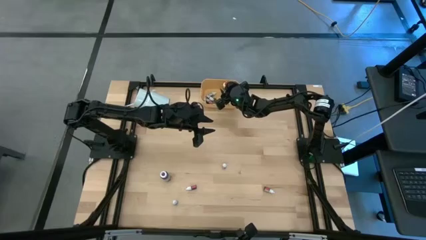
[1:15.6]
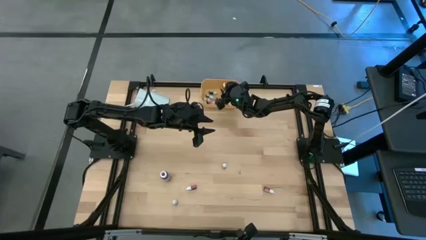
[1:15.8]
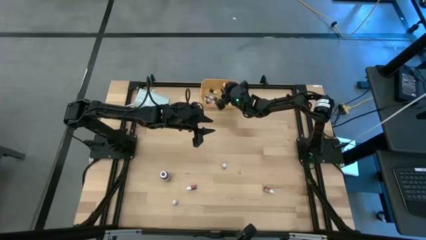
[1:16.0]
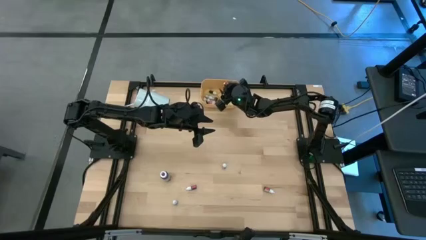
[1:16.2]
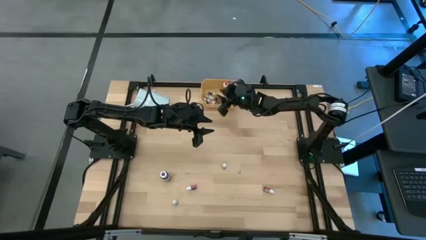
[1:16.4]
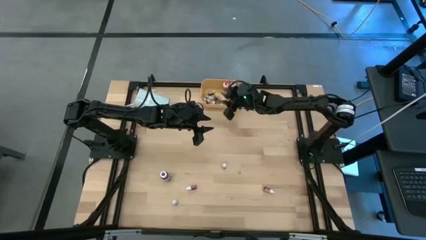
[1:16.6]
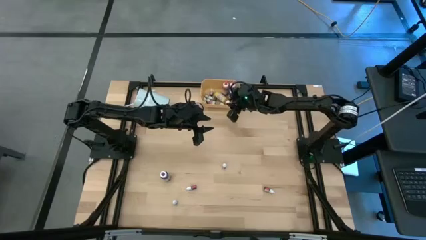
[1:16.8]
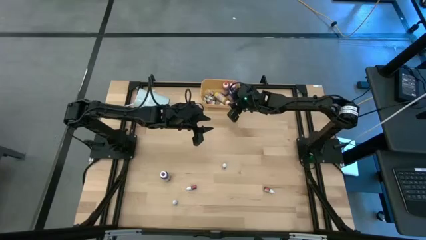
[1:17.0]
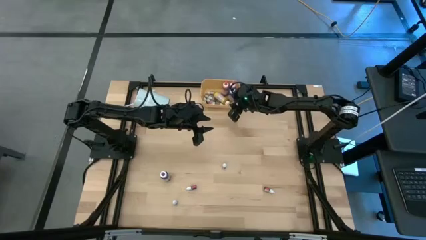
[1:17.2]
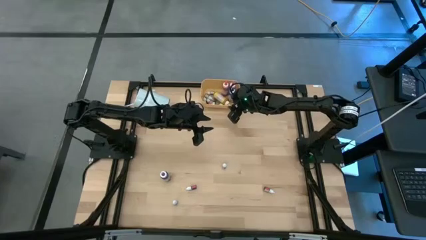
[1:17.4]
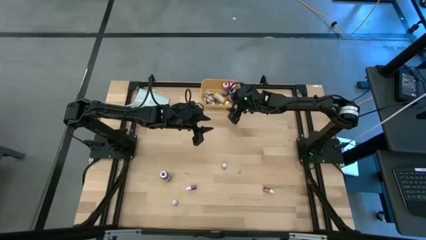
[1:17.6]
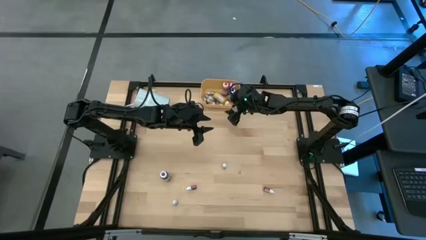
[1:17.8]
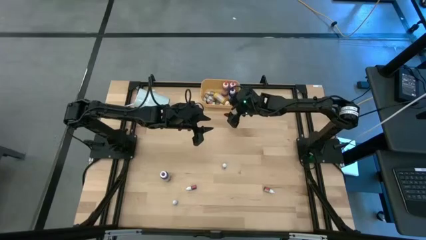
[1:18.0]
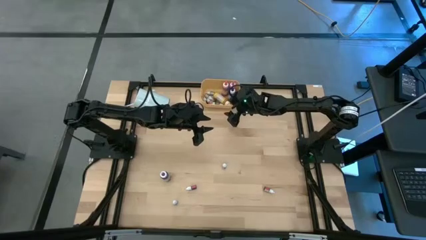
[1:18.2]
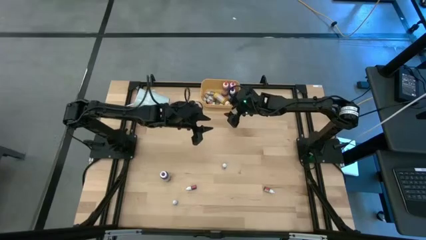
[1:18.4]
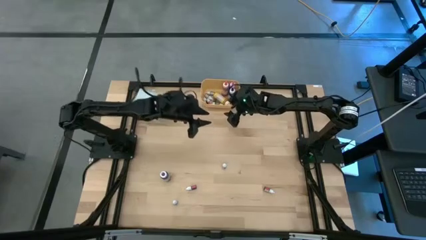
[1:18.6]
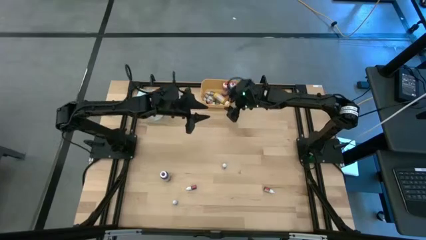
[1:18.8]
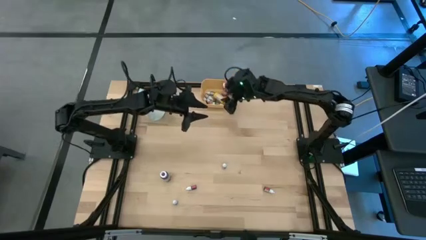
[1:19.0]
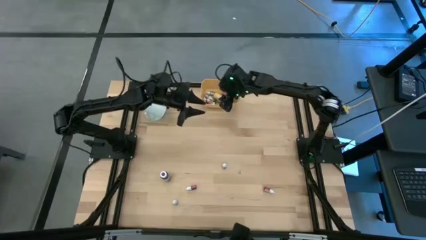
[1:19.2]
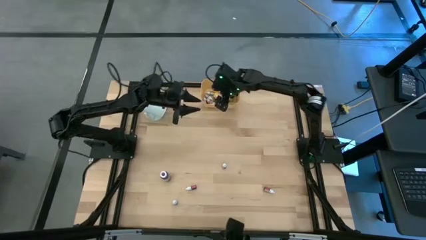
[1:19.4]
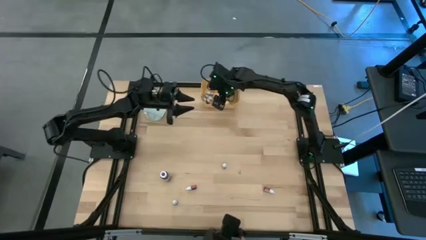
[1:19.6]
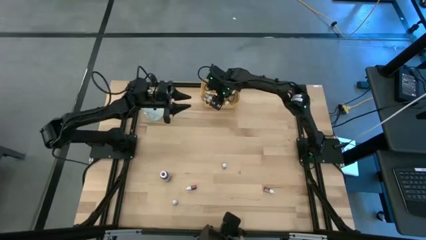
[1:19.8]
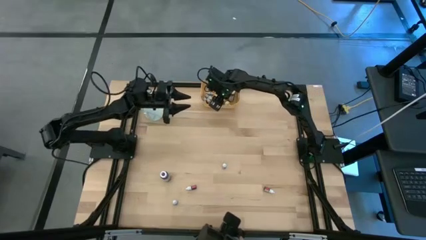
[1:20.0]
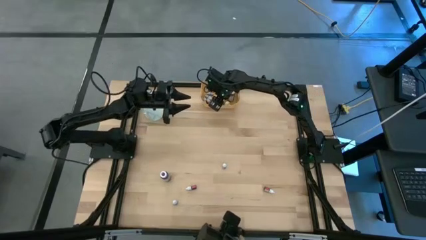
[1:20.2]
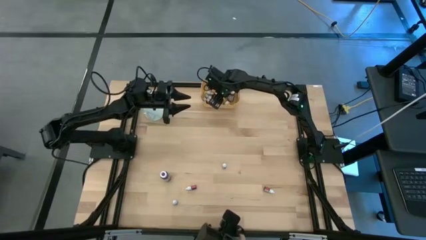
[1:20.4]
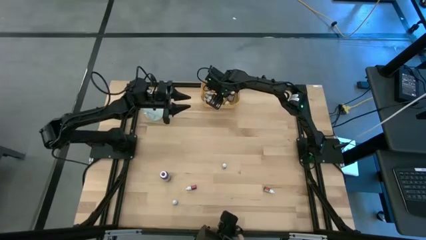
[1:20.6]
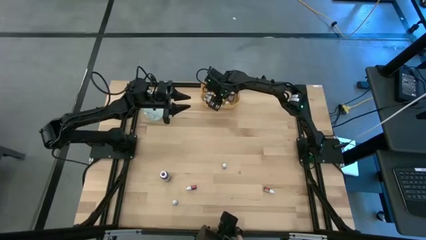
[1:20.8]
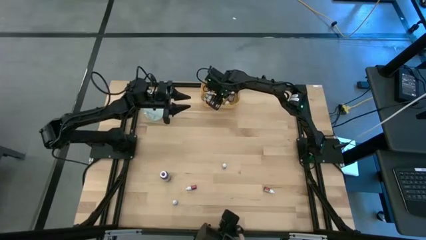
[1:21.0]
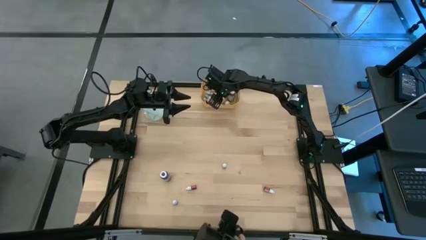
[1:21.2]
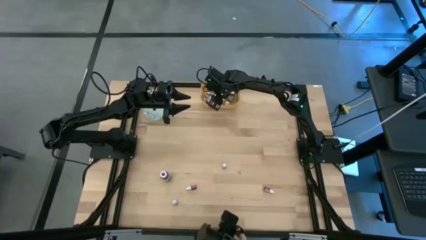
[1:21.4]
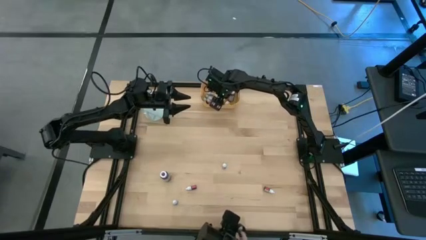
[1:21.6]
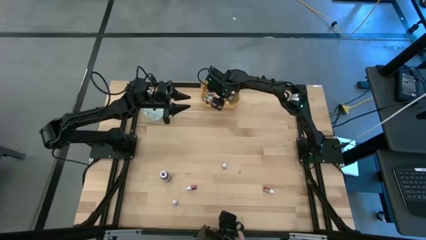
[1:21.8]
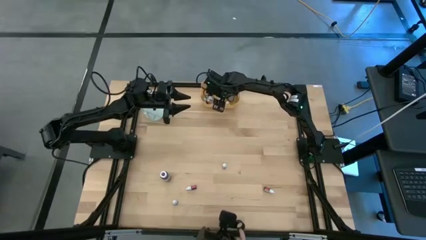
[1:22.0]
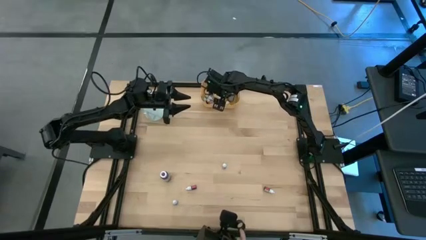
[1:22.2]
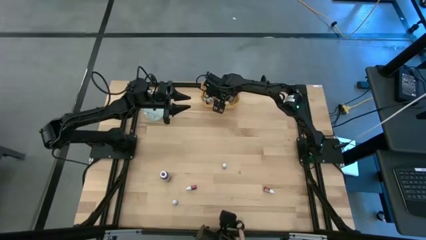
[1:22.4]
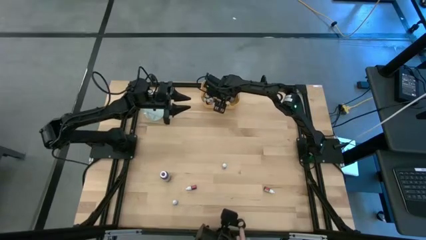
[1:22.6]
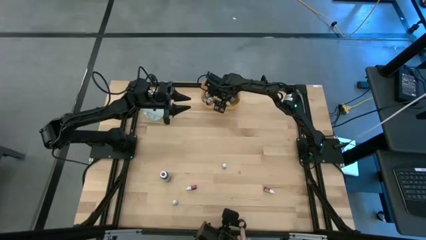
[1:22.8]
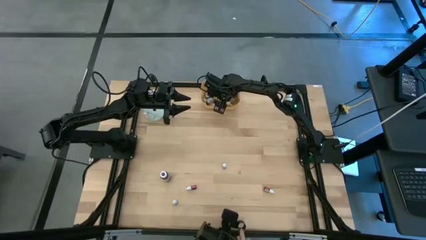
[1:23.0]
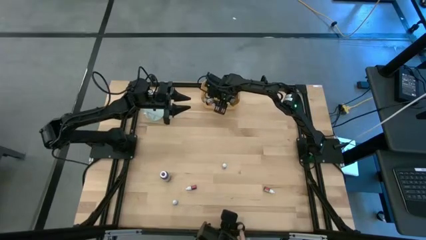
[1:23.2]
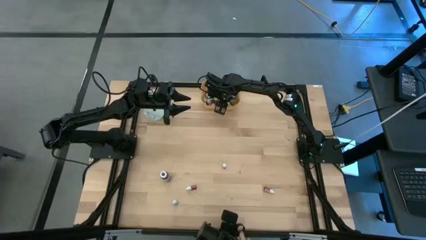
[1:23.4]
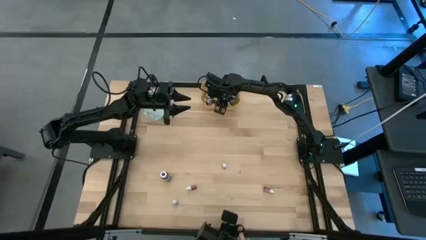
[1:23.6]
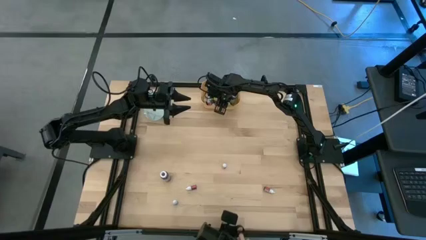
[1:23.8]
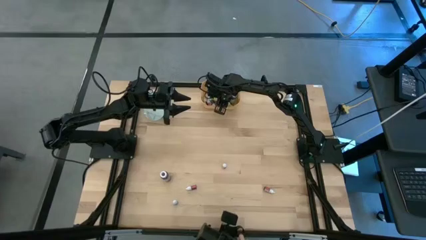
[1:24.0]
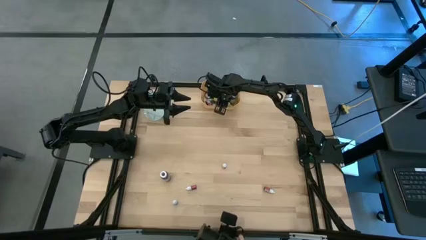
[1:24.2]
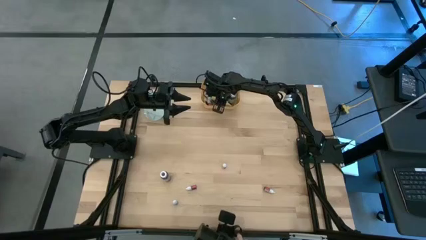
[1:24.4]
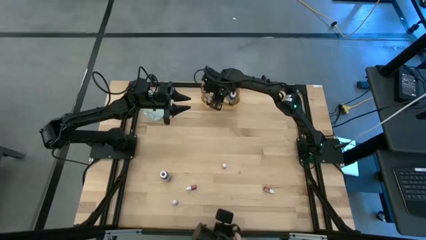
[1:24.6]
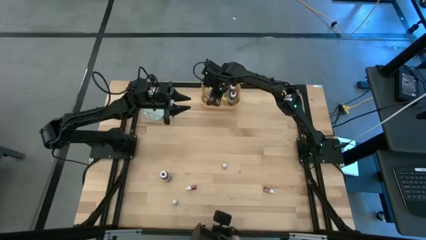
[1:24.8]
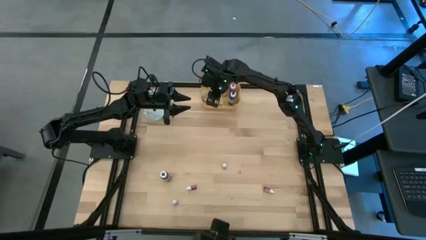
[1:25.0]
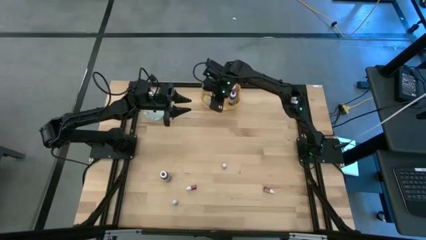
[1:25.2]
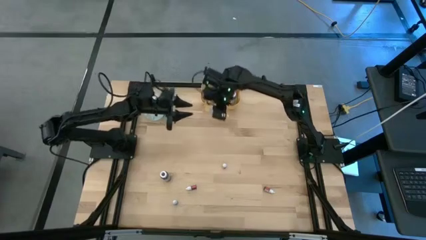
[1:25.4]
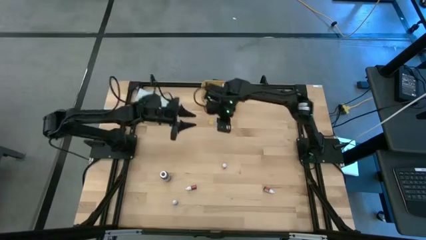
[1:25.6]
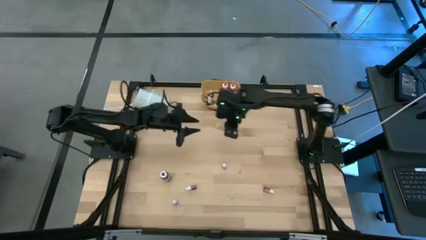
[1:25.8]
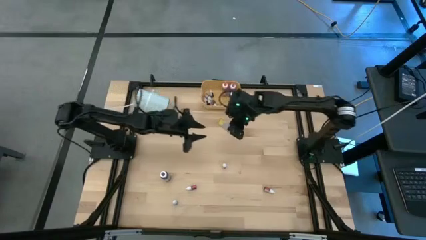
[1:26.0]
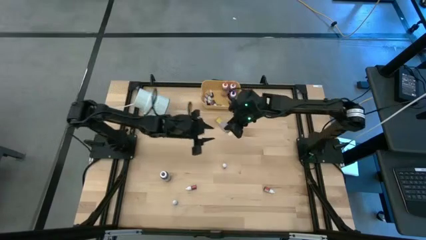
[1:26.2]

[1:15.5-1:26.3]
Task: Pick & Place food coloring
Put the yellow food coloring bottle into the yellow bin

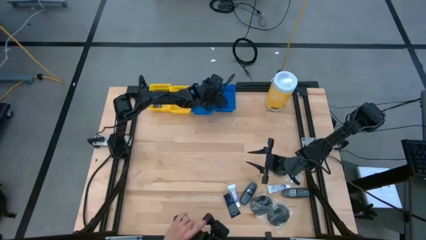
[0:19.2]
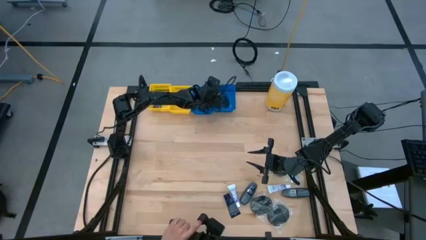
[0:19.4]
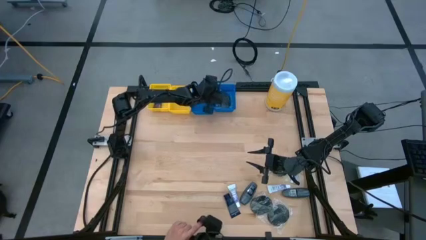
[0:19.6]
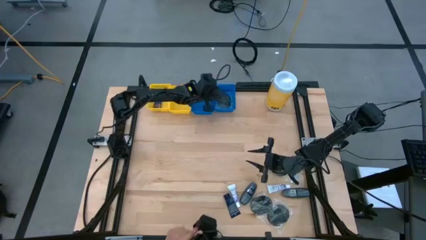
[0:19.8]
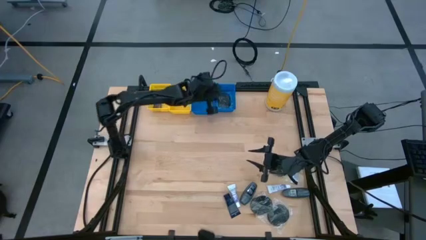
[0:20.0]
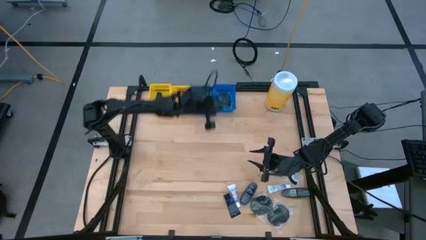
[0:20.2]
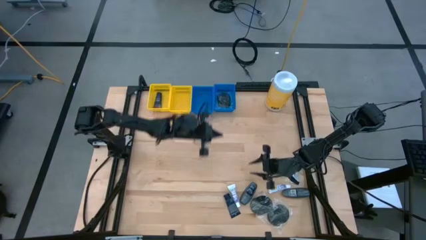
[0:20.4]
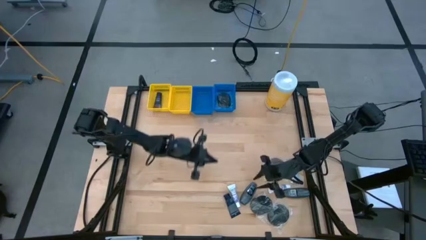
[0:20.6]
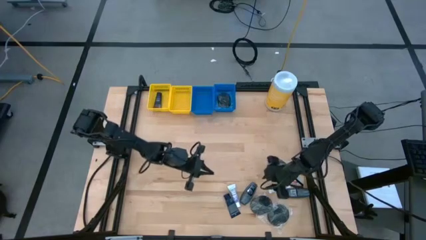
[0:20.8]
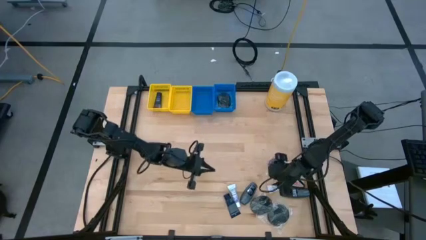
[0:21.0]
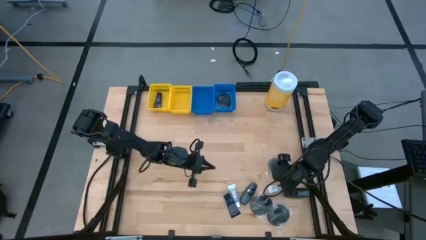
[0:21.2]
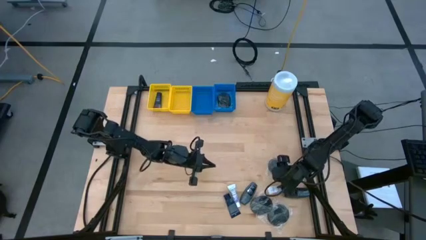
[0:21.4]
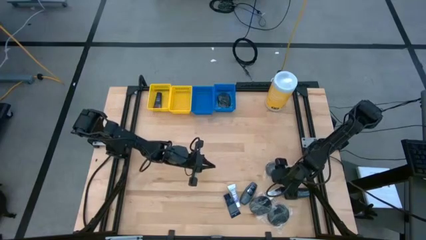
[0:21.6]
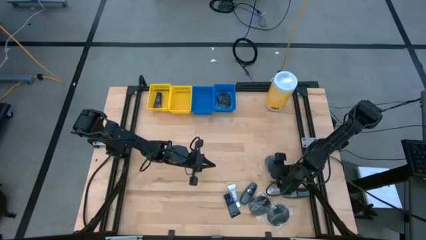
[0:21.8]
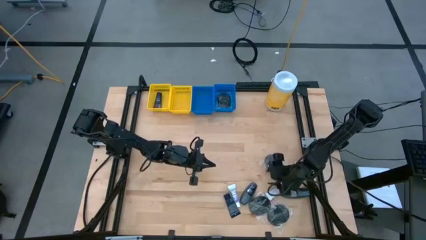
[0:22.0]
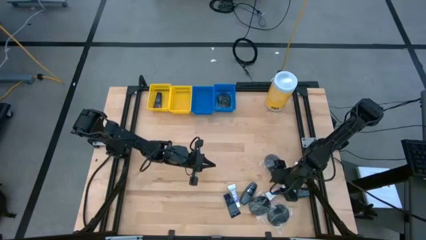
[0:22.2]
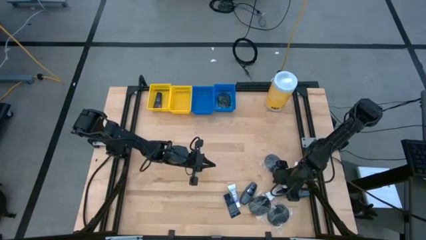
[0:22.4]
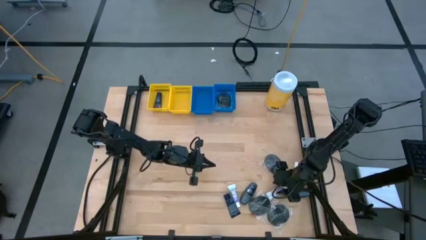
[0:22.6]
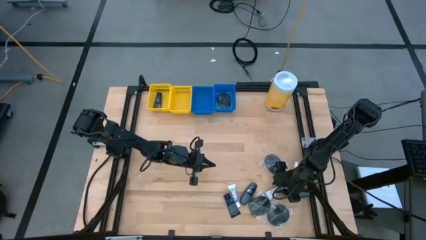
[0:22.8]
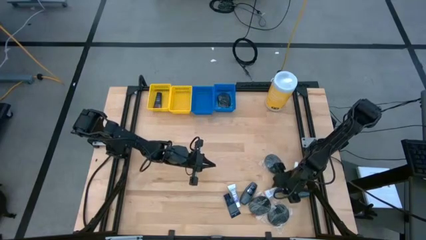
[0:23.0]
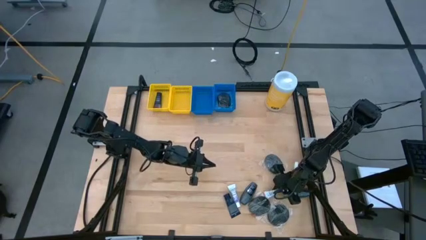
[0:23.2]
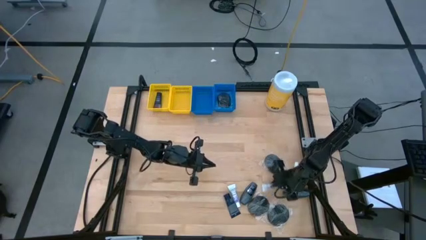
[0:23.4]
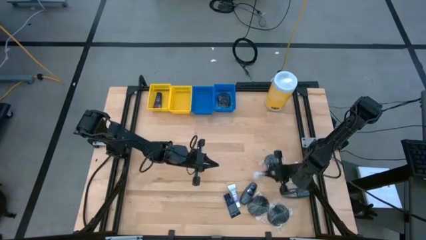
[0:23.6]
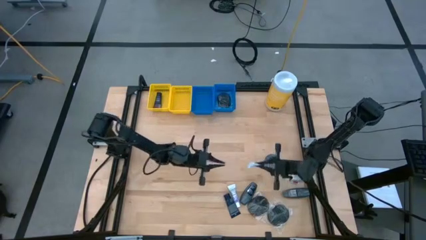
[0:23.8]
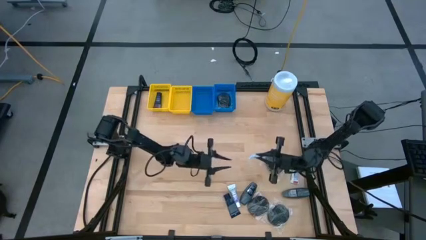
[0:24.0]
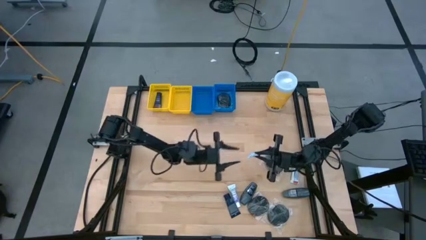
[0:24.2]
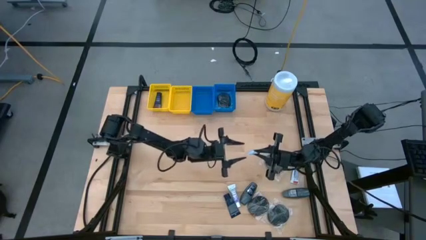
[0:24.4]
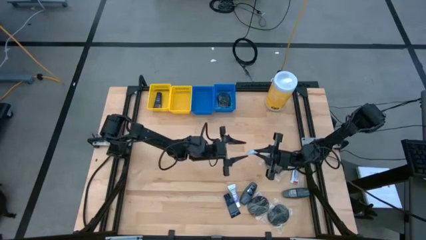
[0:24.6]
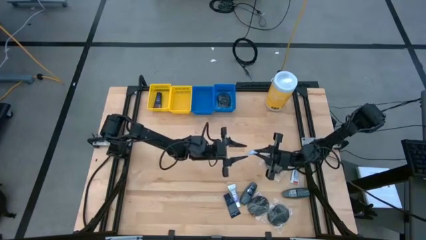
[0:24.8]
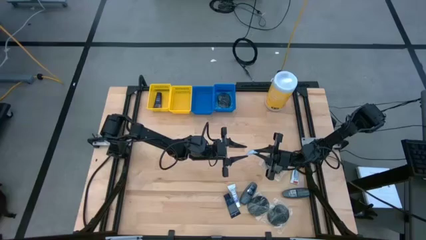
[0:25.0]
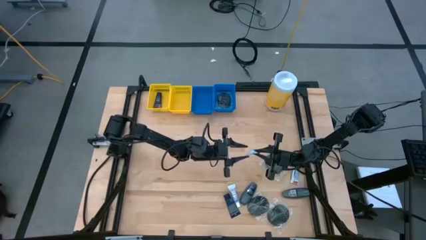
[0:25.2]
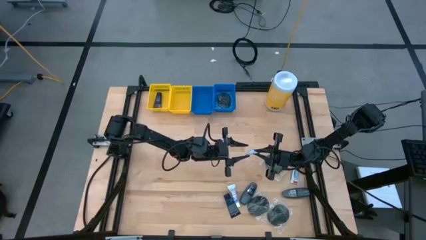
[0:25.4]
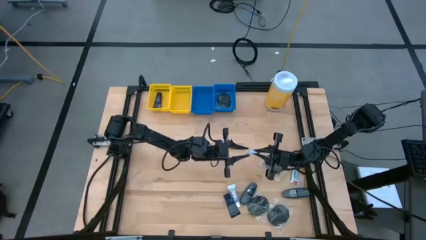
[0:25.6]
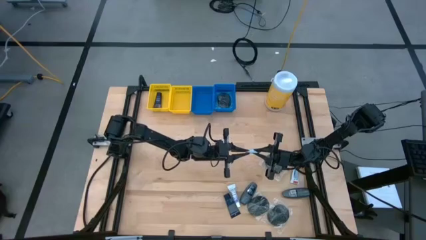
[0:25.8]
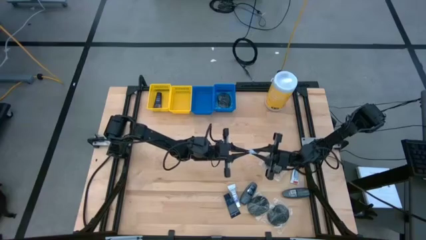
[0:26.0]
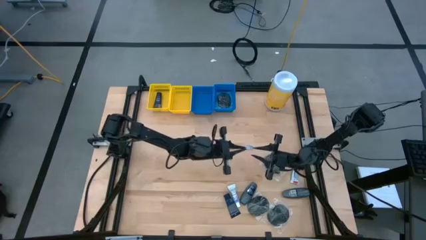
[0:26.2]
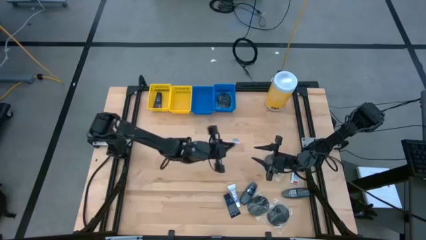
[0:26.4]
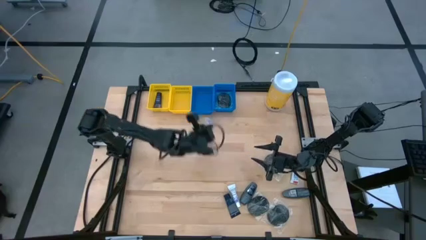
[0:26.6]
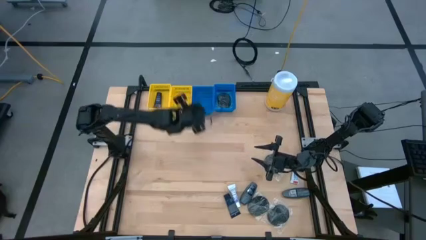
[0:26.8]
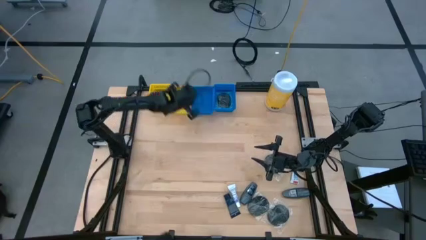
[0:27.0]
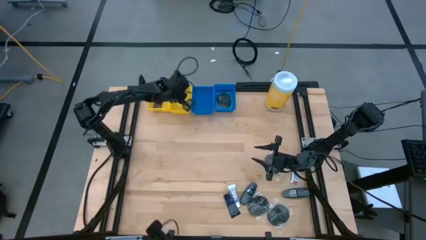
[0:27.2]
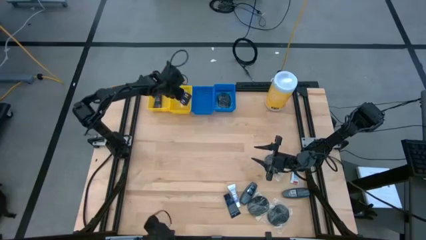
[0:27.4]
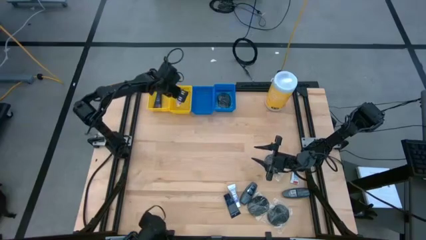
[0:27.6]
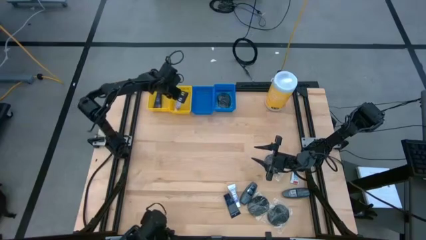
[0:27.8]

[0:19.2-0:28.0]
Task: Pick & Place Travel size toiletries
Put the white toothpaste into the right yellow bin
